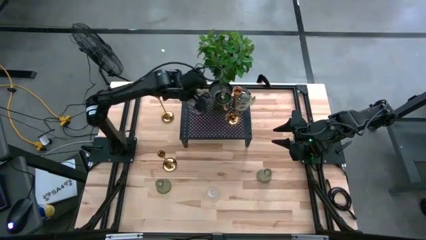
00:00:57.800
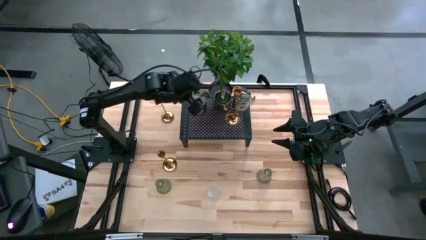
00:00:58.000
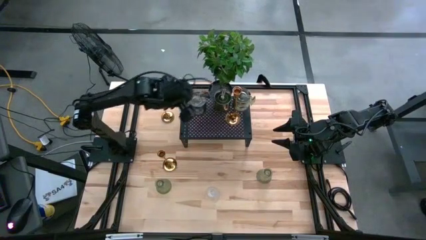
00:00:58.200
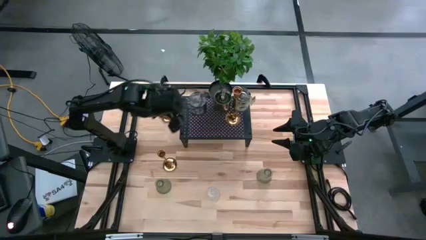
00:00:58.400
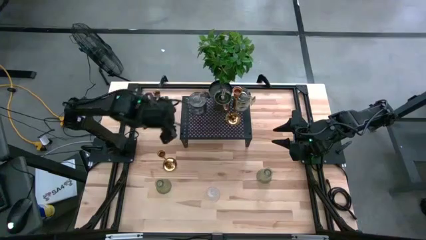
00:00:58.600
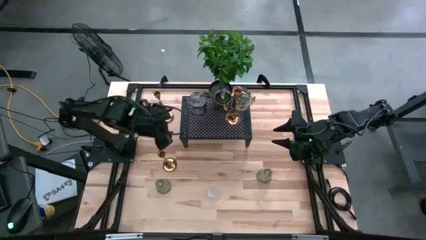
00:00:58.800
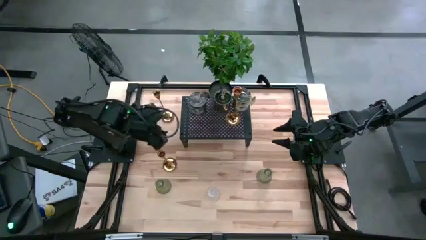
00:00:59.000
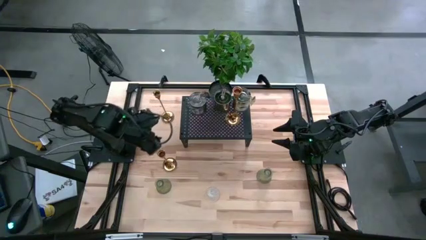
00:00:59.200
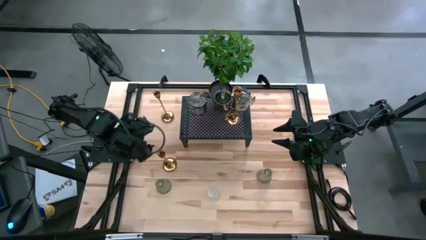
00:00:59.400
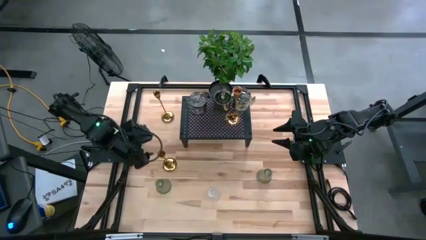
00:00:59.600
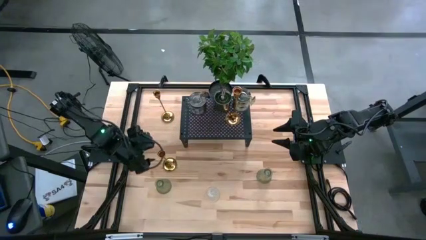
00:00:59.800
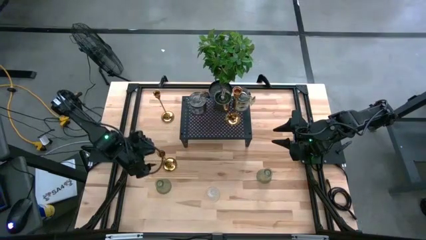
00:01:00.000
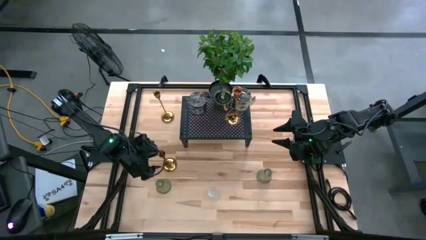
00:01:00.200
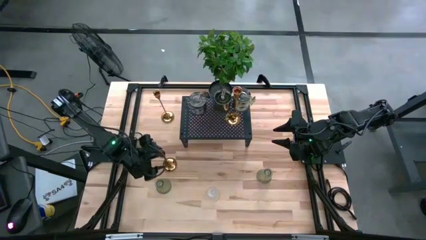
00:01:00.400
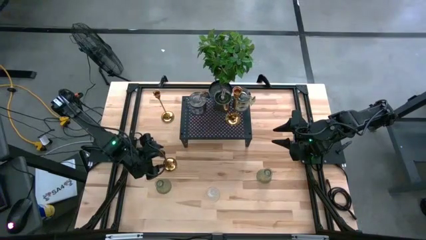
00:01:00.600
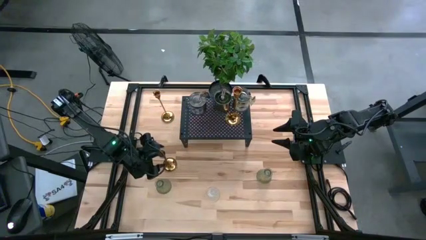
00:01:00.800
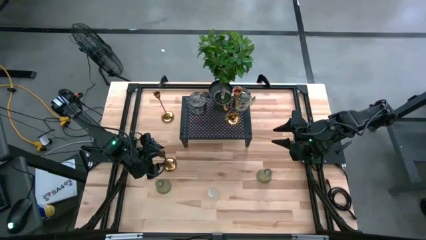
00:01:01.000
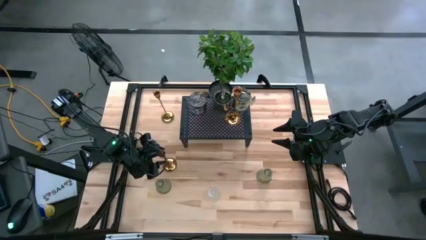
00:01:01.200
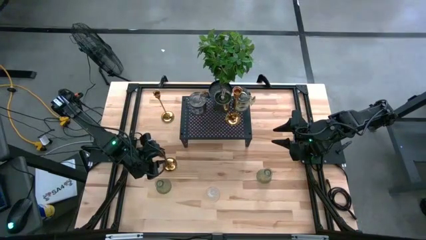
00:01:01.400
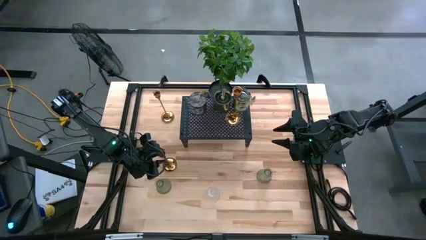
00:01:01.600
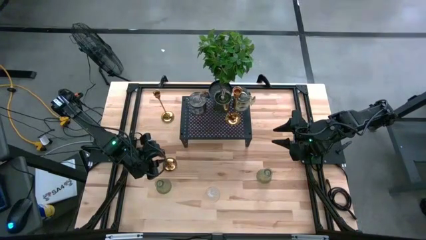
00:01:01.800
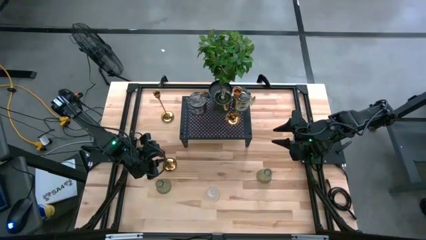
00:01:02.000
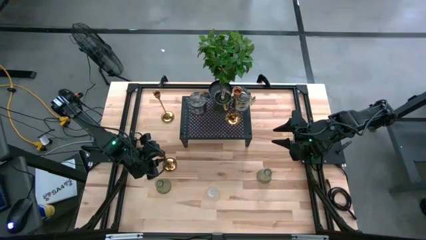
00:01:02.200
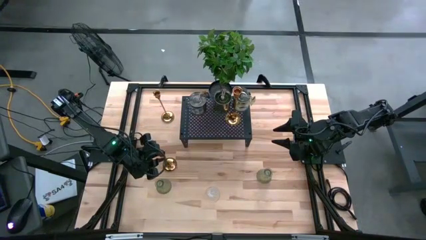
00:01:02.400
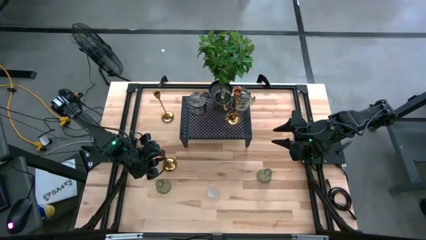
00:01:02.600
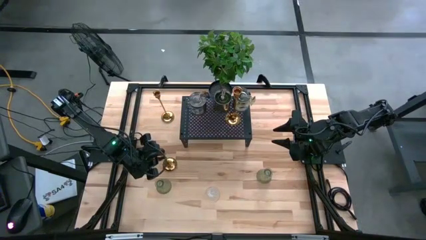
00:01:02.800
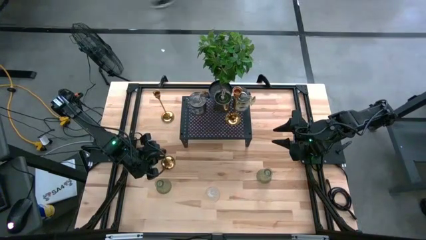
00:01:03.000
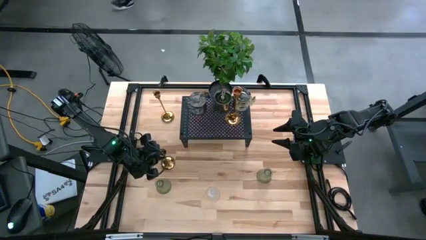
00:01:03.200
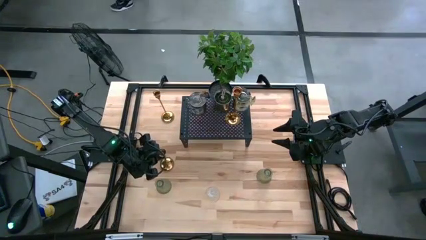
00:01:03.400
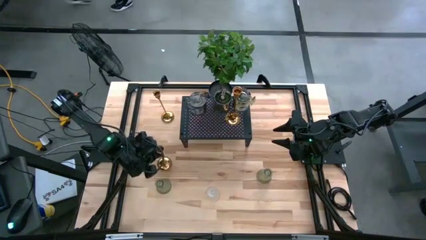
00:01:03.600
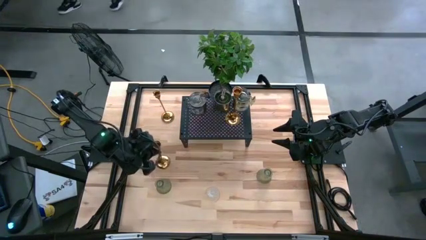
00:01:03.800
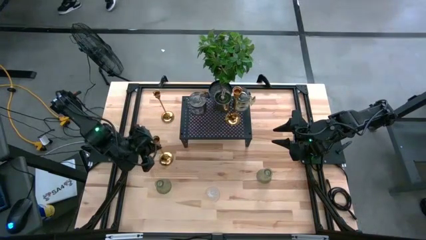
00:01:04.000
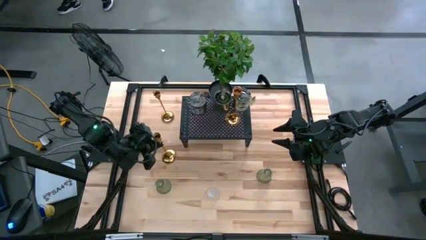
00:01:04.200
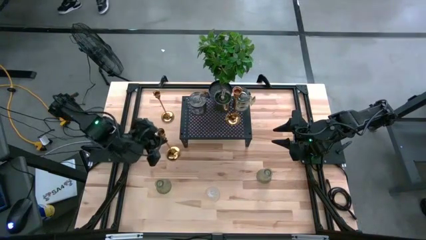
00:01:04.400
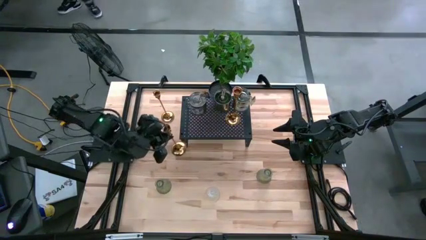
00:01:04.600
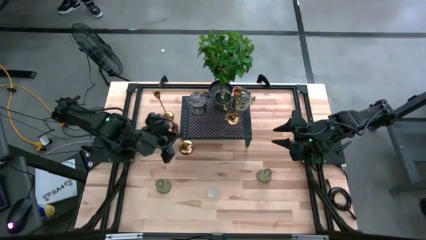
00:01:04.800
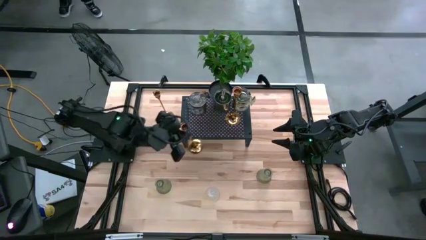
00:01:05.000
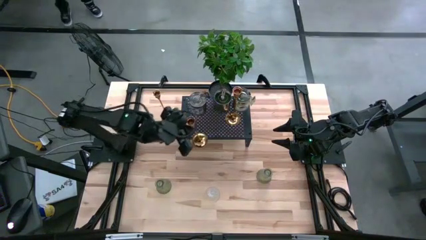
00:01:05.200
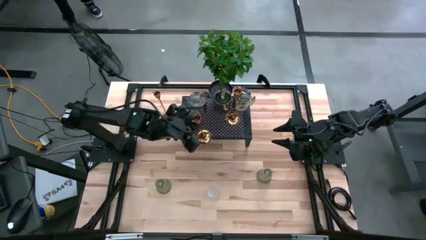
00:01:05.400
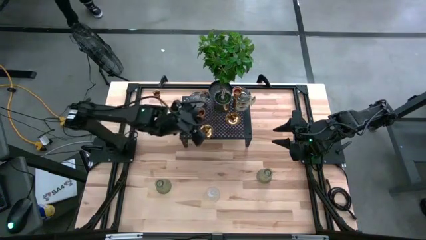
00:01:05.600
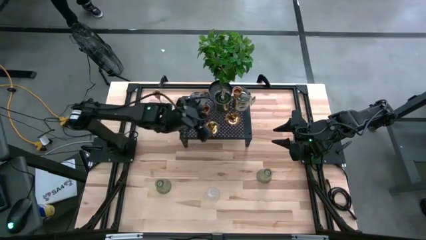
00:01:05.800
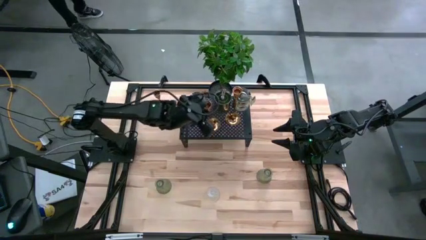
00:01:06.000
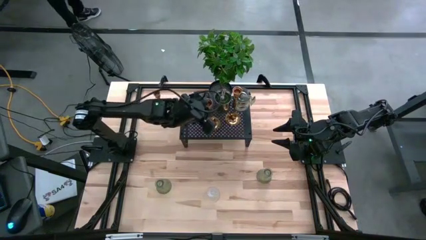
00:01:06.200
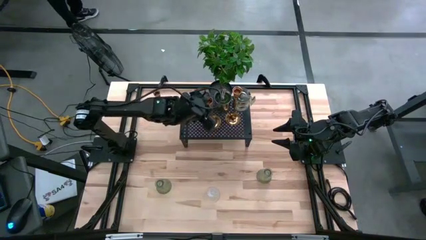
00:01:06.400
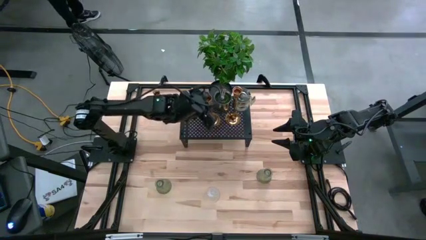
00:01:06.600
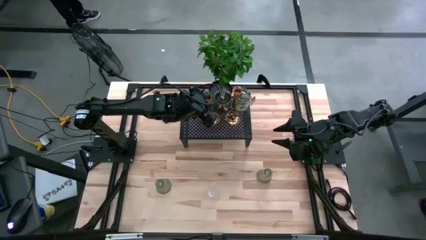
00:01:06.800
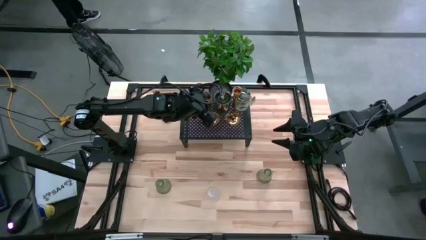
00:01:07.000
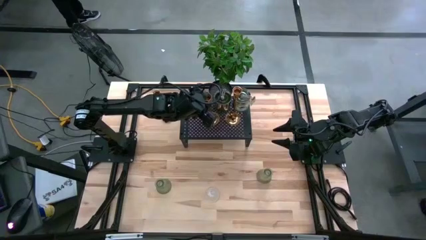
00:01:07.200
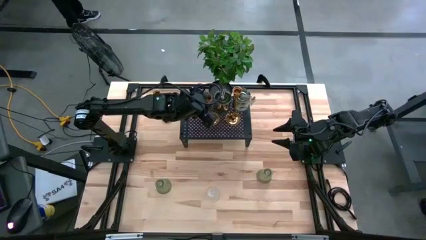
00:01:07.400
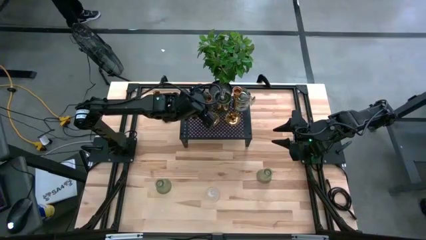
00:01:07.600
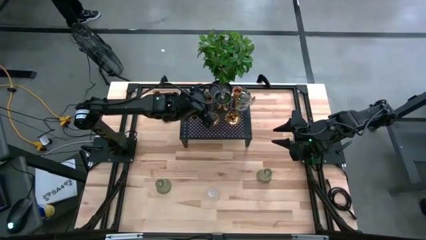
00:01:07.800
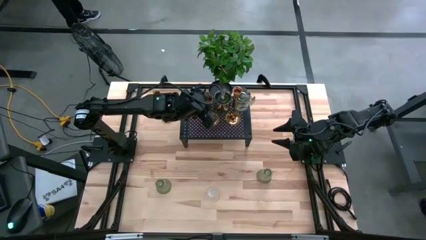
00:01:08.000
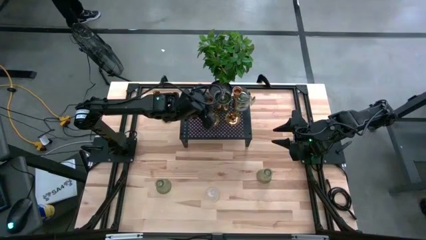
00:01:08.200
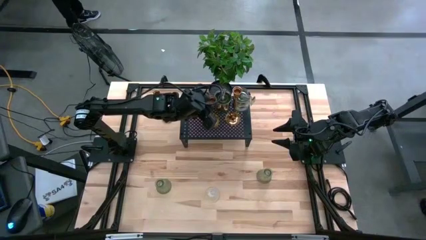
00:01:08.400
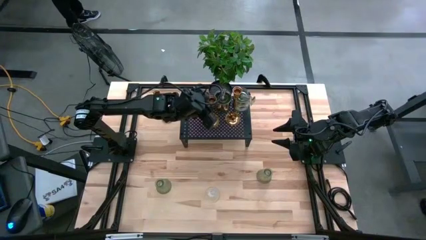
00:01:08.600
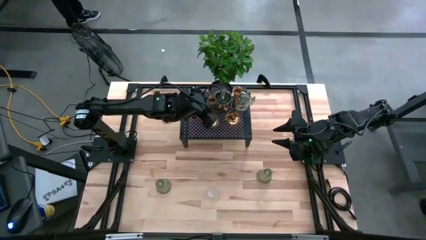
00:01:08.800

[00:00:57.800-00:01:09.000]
Task: Pick & Place candle stick holders
Put the bottom gold candle holder on the shelf aligned with the other gold candle holder

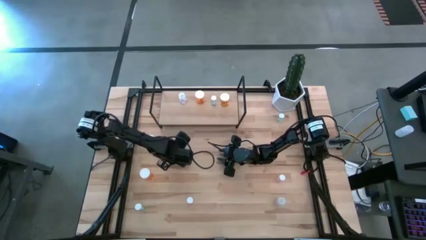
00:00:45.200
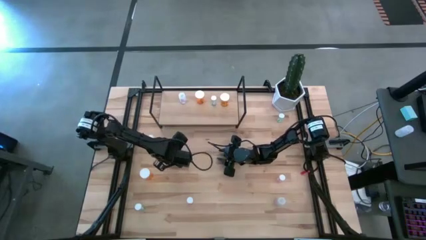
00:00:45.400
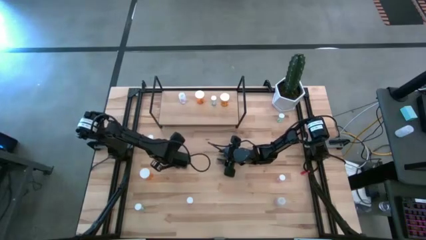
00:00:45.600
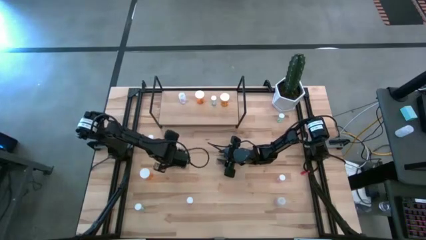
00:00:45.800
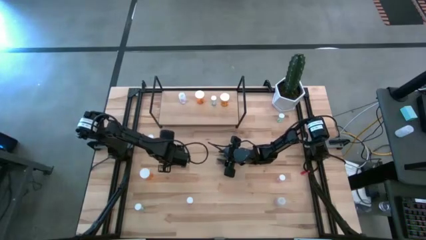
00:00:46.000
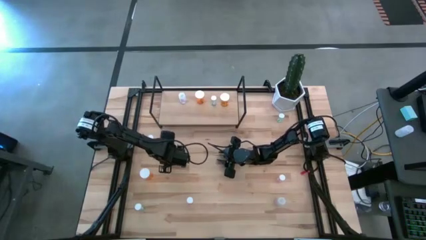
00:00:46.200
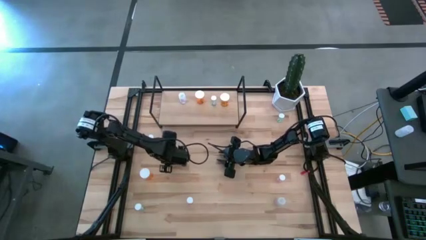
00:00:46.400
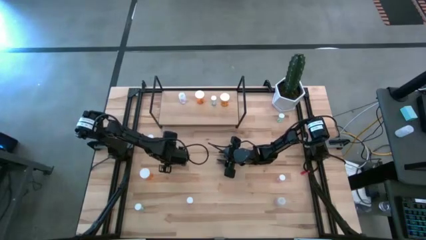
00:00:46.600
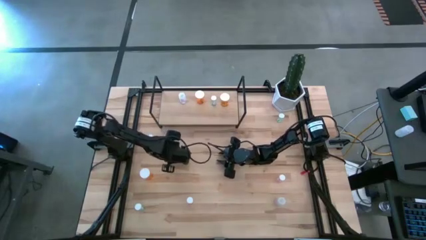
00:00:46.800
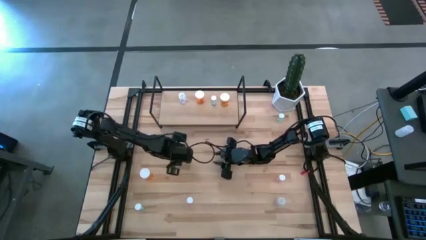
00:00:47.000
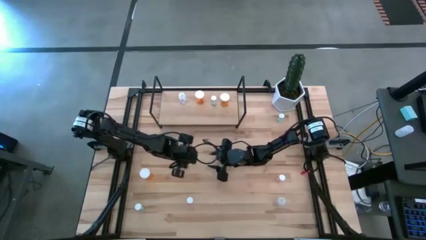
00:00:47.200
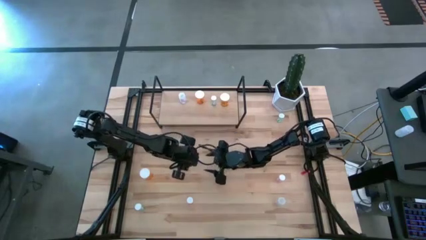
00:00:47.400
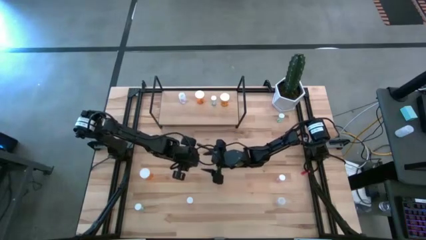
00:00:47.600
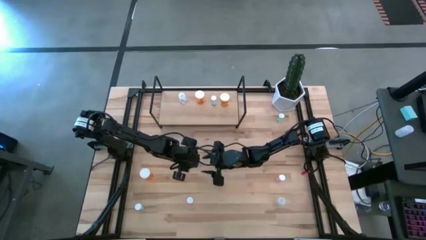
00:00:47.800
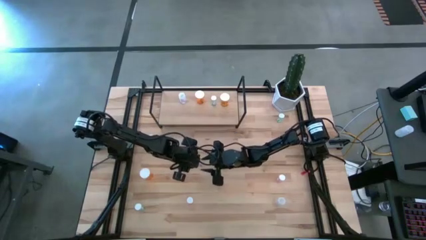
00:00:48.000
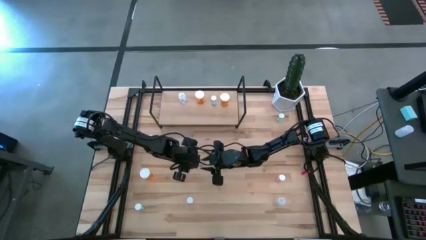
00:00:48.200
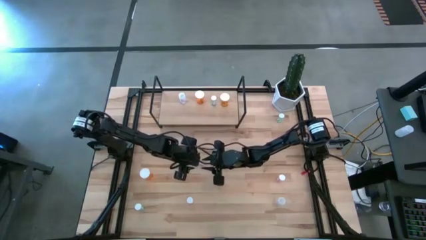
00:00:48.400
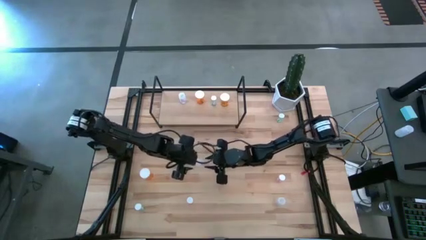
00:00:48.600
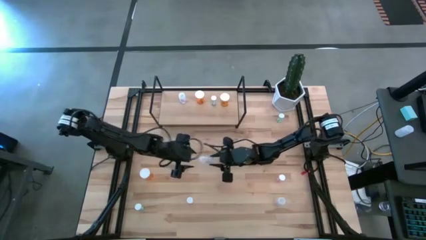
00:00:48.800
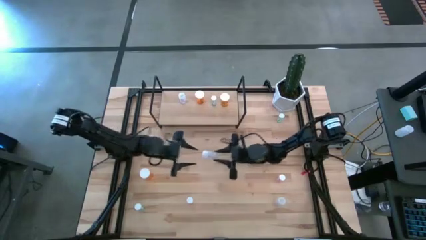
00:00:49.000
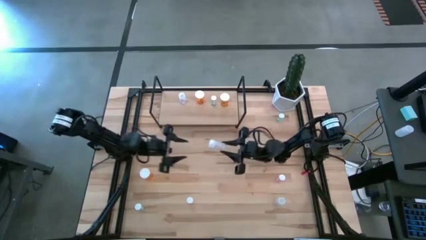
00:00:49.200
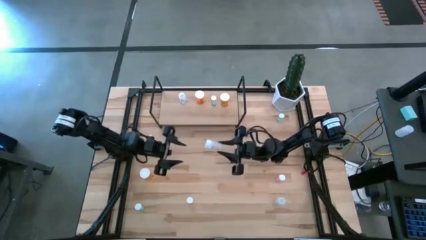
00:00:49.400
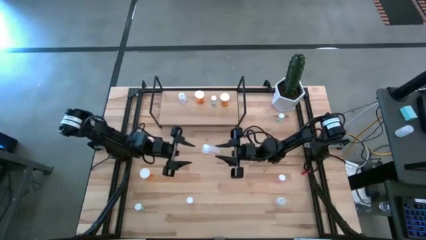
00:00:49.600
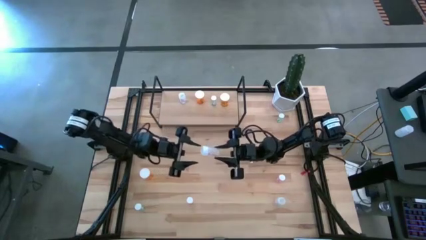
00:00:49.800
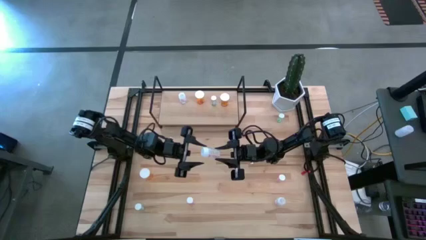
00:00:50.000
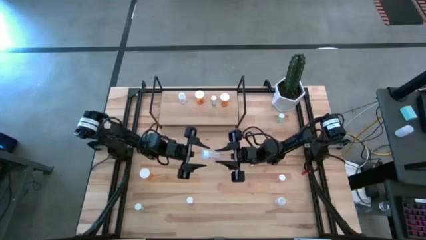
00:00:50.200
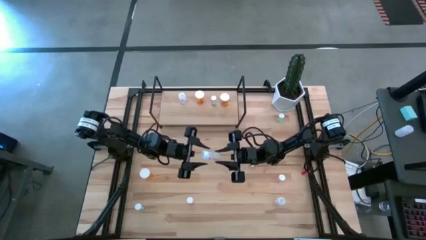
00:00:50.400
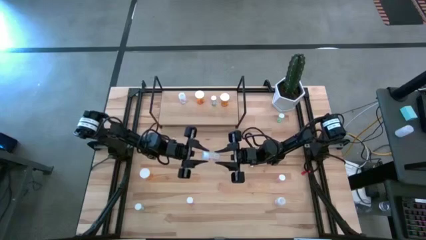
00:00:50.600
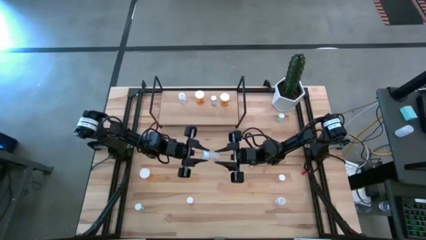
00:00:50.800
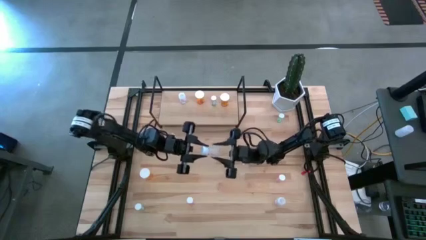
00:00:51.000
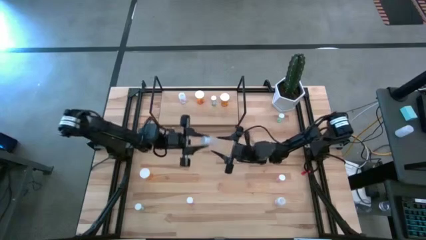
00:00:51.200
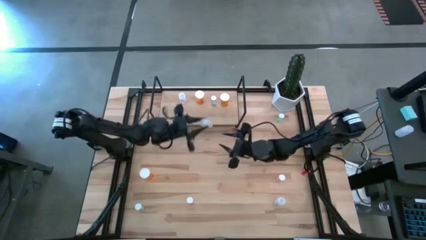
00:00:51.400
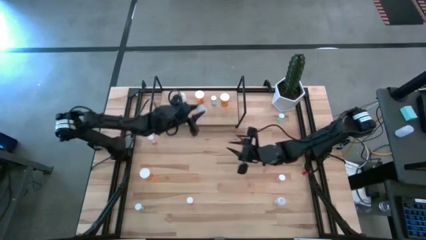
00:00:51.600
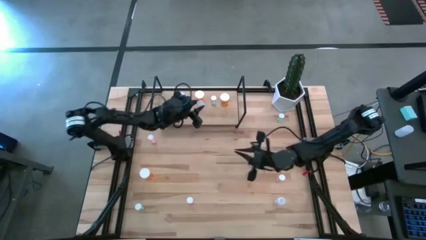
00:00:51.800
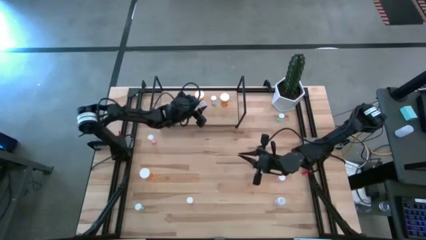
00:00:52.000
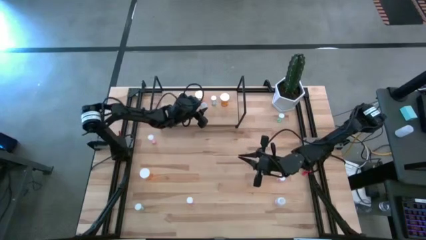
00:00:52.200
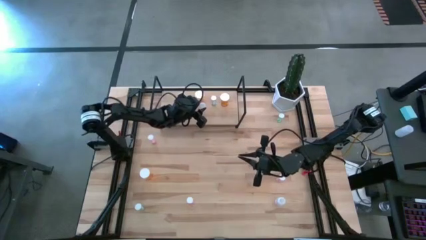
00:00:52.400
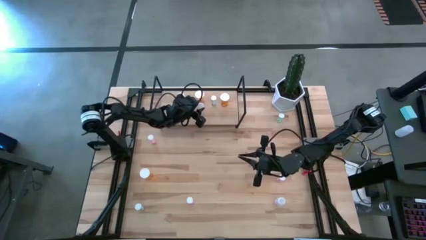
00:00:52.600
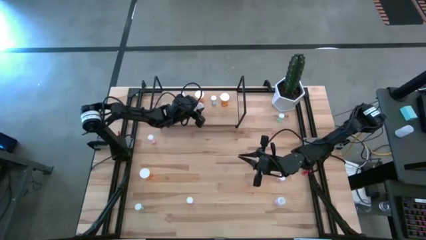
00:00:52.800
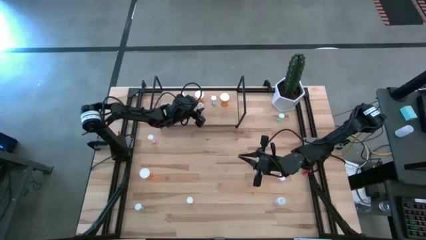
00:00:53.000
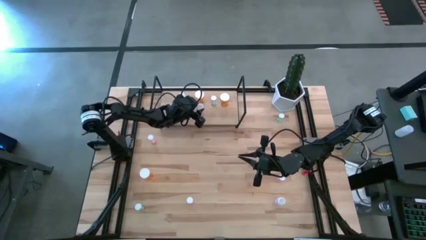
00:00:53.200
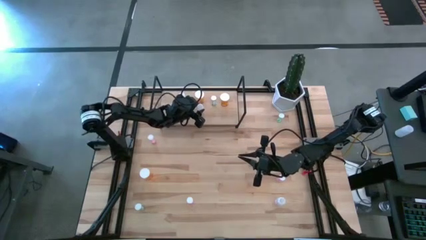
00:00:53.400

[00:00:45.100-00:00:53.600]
Task: Pick and place medicine bottles onto shelf by color
Put the top transparent pill bottle on the shelf
